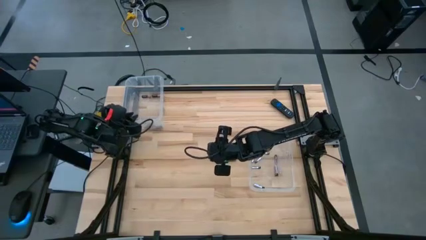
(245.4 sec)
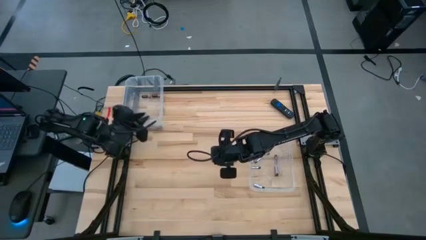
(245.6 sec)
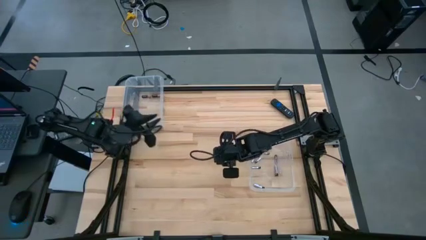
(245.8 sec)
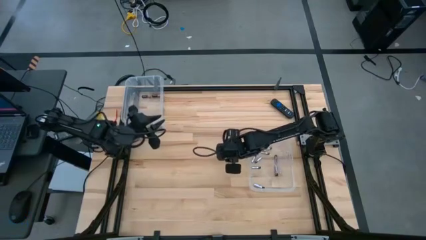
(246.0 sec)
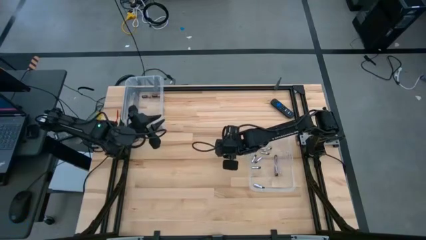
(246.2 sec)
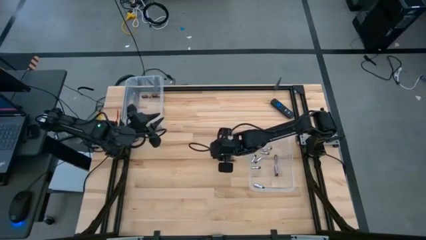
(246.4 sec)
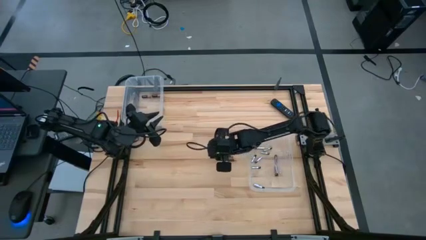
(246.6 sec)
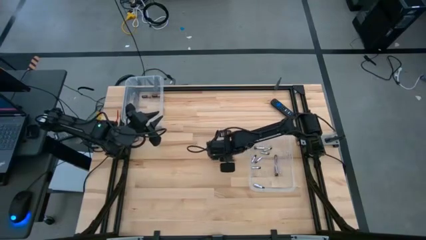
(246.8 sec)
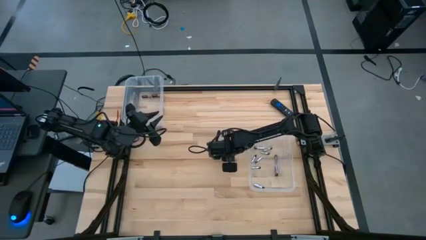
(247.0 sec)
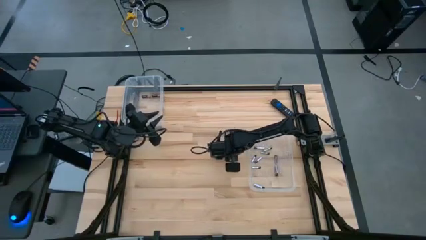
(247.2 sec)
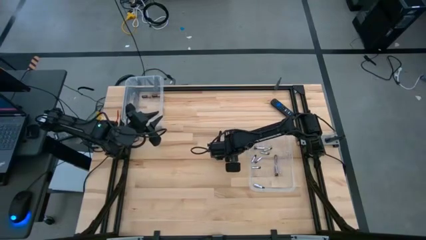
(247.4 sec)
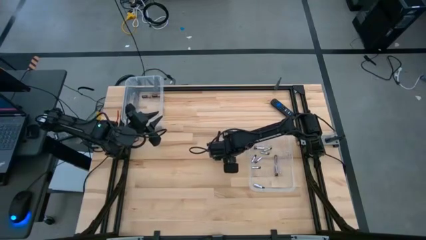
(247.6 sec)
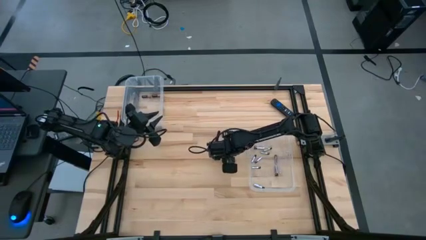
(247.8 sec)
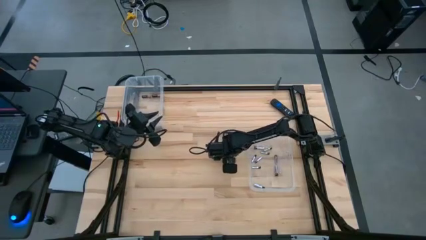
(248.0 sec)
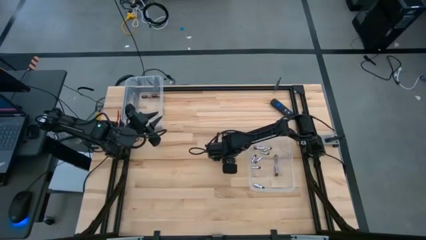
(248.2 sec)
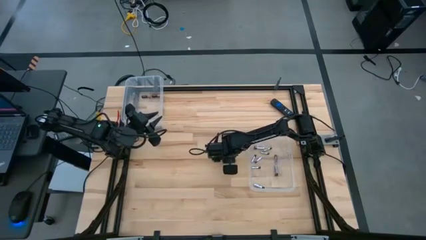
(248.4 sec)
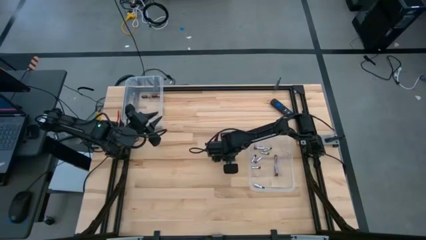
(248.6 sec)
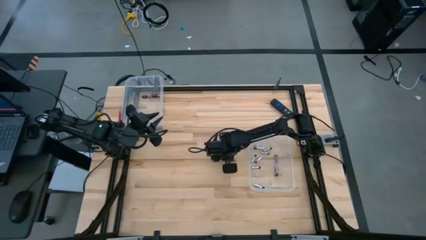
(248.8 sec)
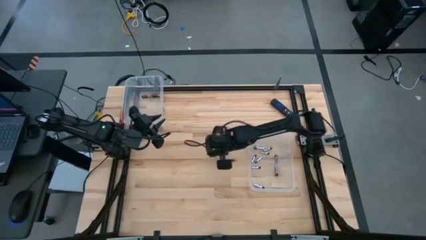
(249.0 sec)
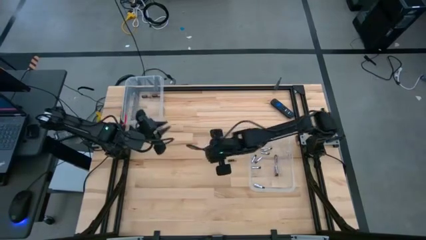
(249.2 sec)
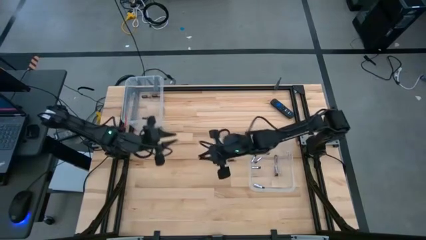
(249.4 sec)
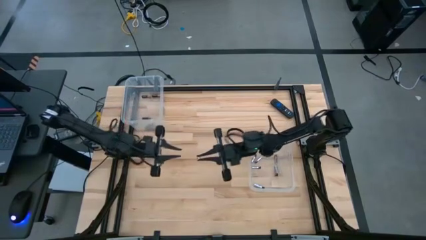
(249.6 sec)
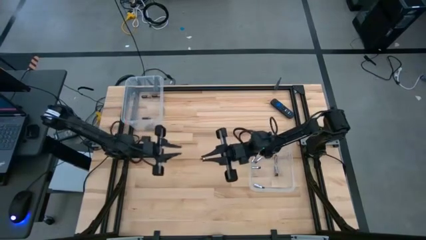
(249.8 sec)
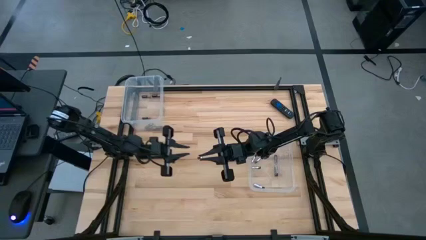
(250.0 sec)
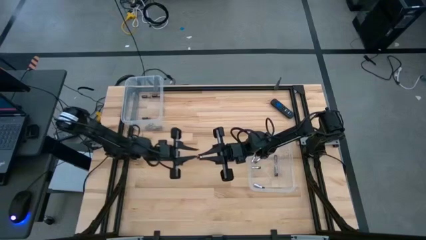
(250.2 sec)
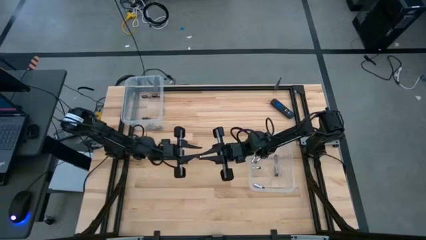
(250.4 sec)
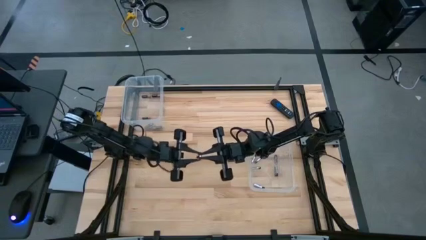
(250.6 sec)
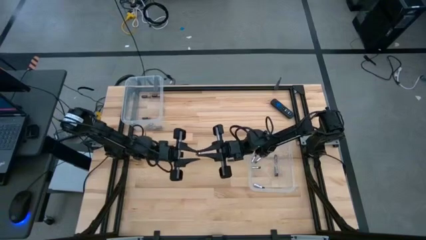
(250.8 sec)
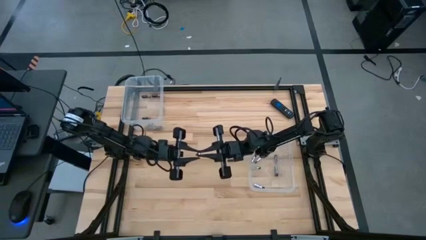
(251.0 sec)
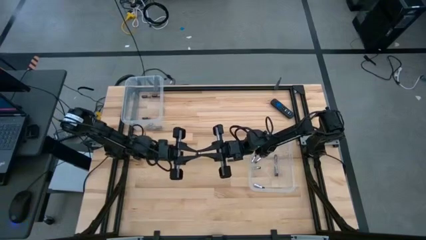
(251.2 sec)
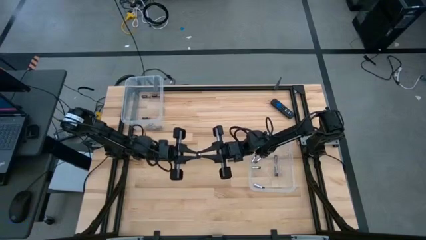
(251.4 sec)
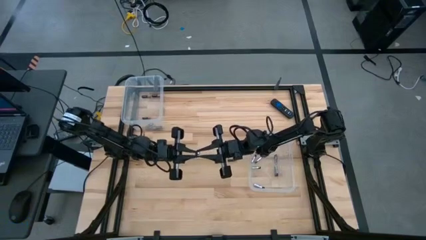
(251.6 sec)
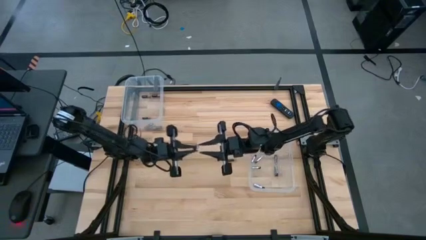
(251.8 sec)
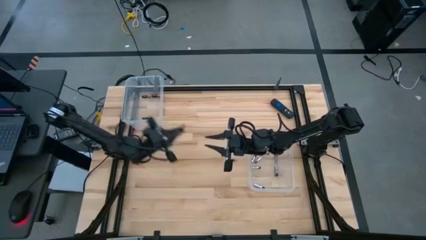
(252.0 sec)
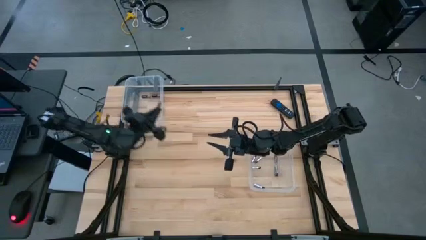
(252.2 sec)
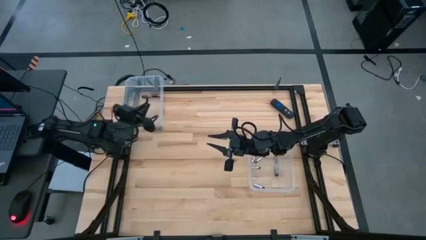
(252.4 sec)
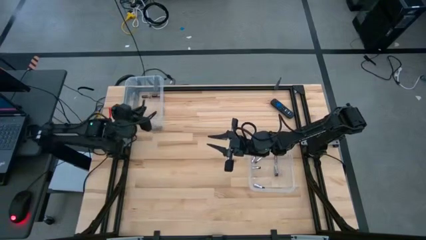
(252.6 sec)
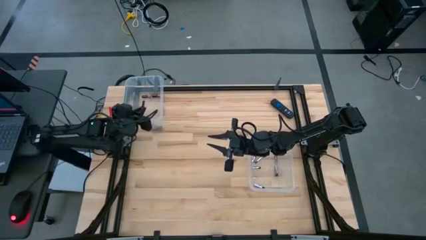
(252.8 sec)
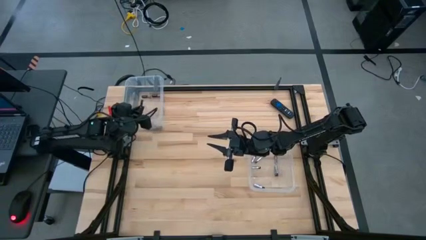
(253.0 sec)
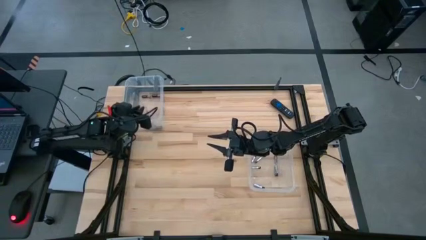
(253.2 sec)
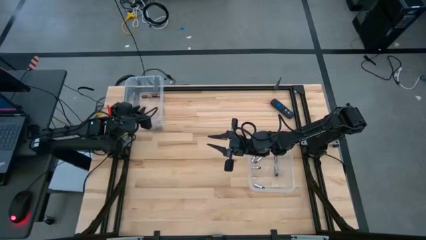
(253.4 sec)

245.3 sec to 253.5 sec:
Task: Sort batteries
Put the black and copper battery into the top transparent bin

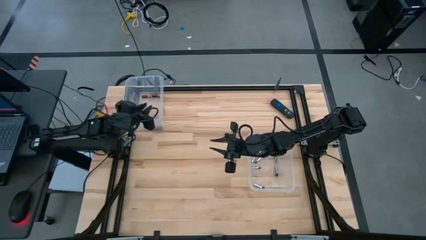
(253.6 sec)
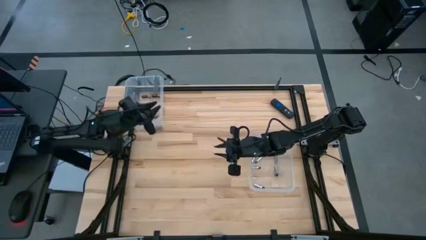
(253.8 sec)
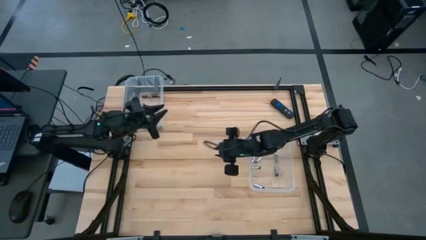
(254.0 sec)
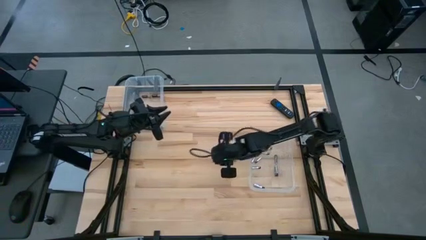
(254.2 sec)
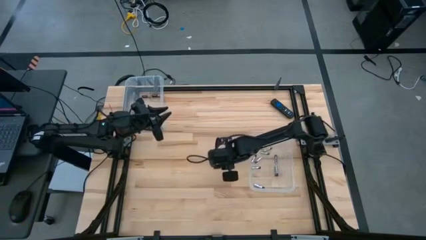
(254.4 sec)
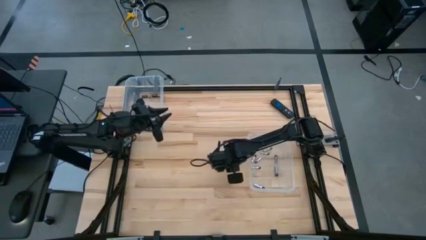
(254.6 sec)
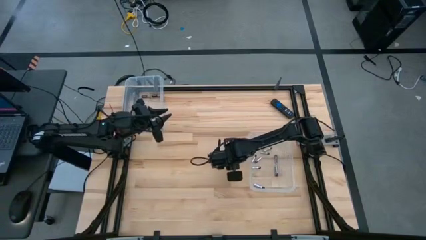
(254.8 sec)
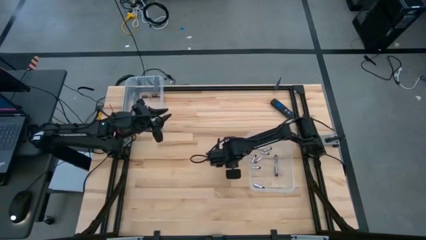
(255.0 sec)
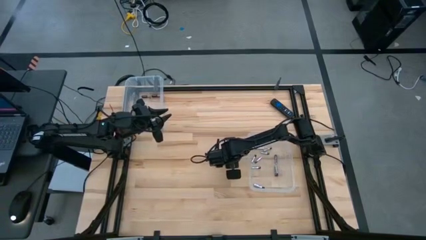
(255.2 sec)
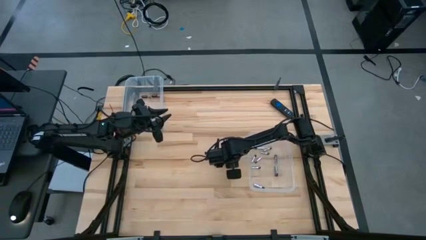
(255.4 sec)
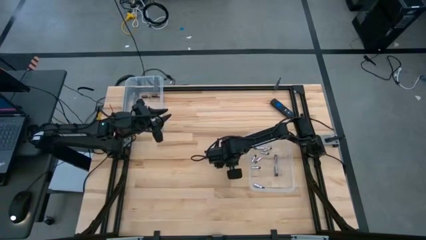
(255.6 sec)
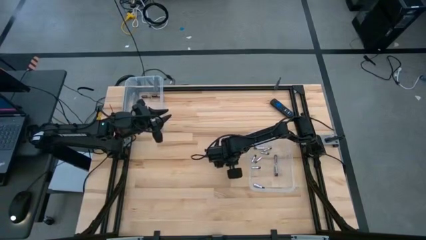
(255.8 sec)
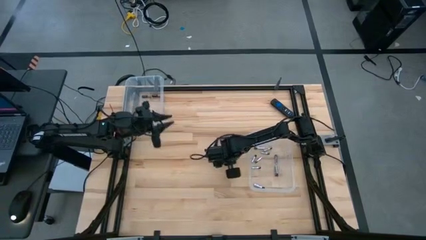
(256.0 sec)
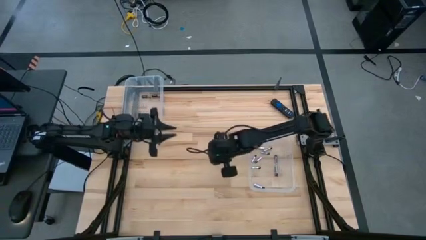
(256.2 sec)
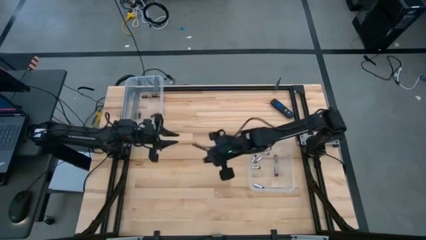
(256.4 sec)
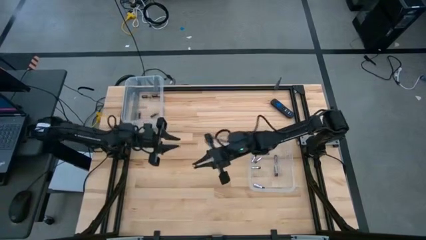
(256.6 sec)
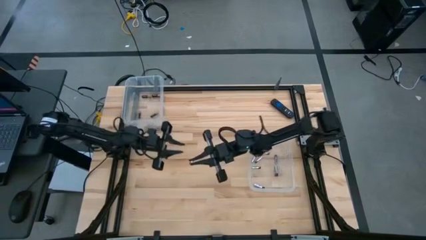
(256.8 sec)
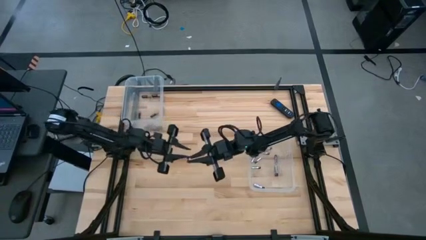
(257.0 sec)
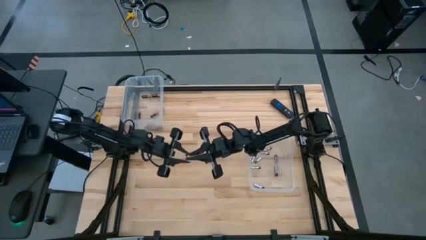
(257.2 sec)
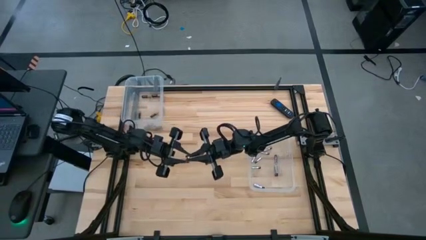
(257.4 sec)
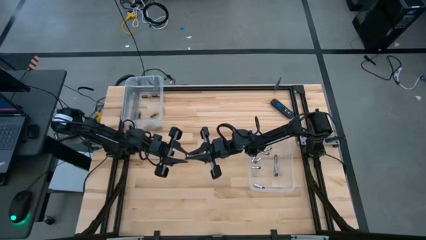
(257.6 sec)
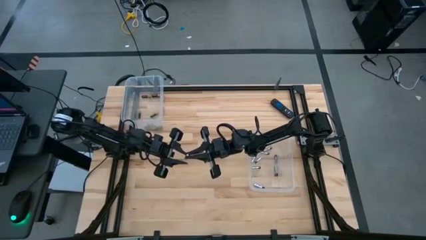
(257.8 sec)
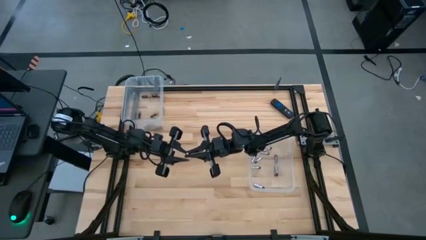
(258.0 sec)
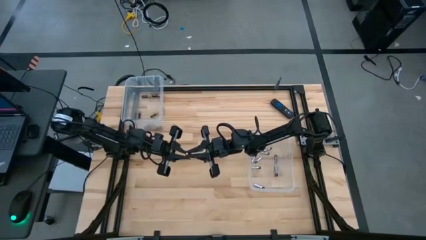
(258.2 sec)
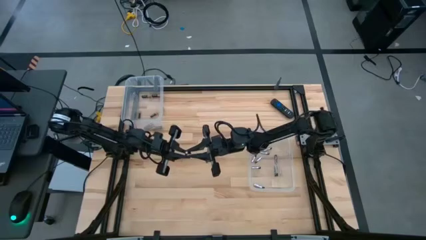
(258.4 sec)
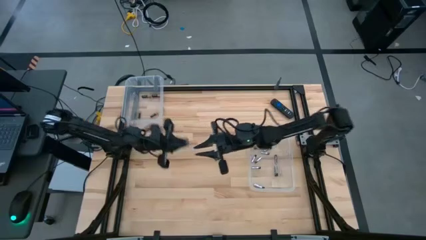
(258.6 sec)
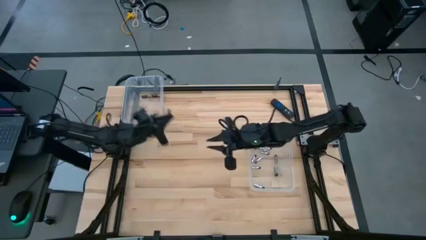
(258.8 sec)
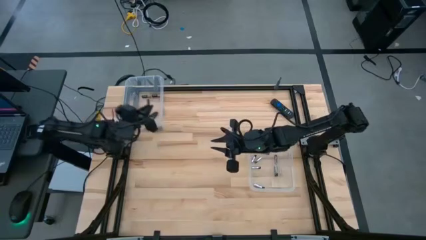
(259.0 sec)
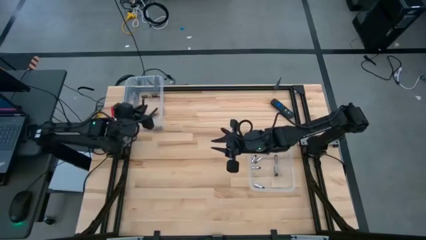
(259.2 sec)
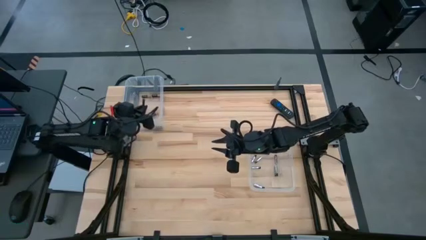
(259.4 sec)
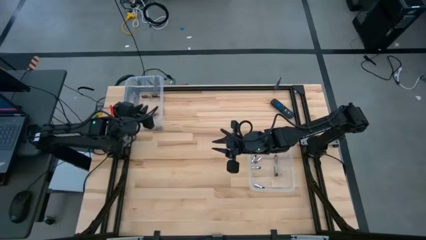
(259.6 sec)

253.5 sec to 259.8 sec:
Put the black and copper battery into the top transparent bin

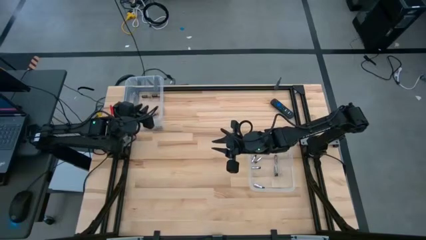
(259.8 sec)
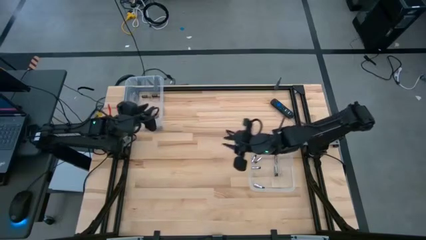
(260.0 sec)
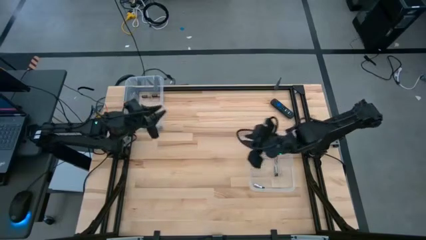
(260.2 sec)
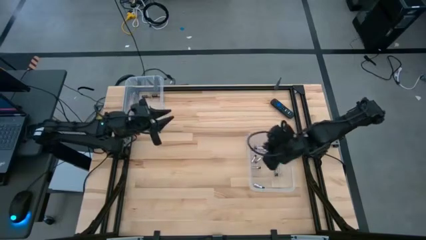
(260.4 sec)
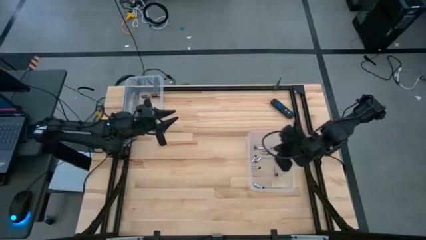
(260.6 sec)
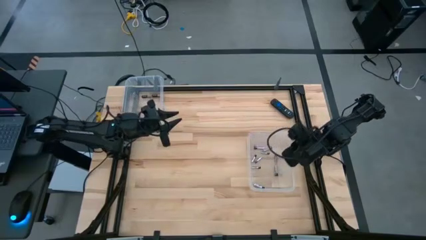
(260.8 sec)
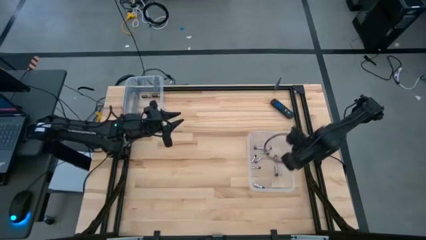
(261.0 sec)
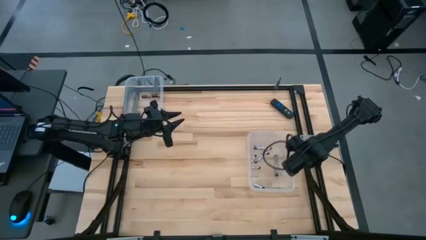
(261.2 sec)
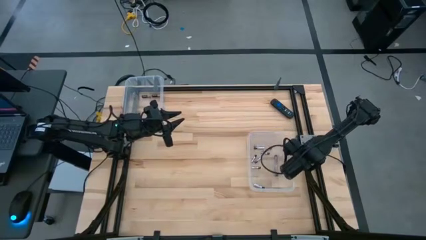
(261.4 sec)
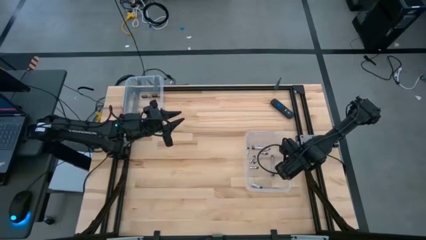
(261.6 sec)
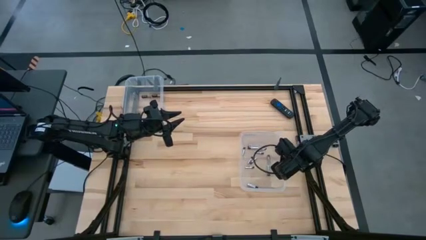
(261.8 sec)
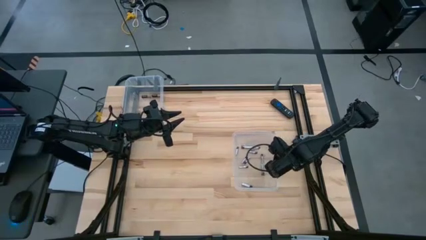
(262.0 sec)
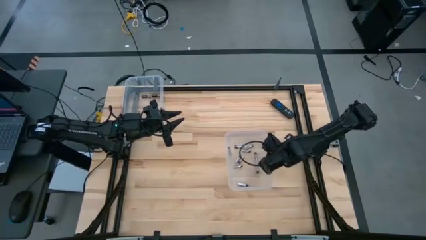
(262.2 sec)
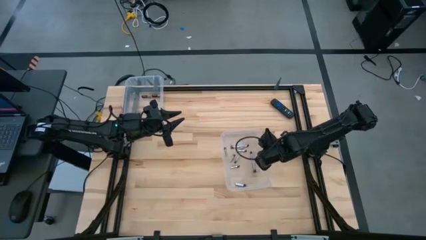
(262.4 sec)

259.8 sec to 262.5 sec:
Adjust the bottom transparent bin
